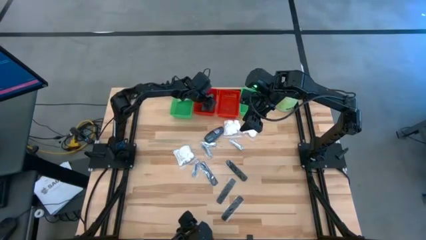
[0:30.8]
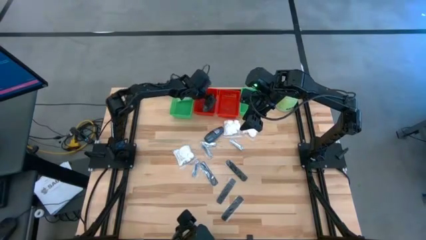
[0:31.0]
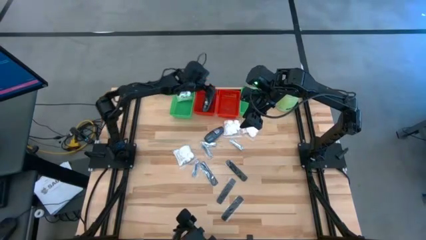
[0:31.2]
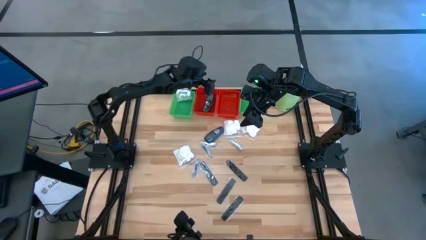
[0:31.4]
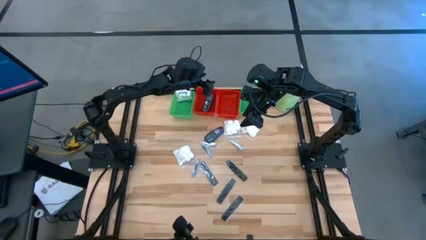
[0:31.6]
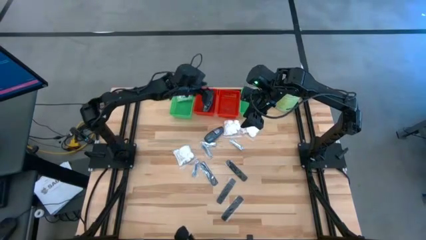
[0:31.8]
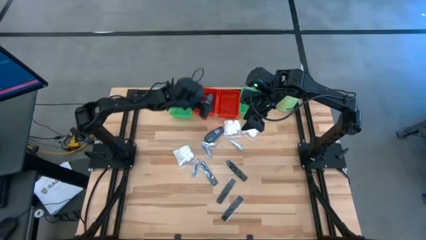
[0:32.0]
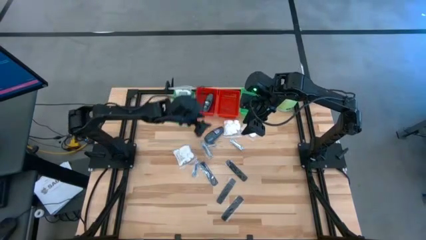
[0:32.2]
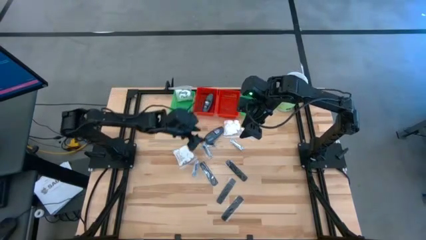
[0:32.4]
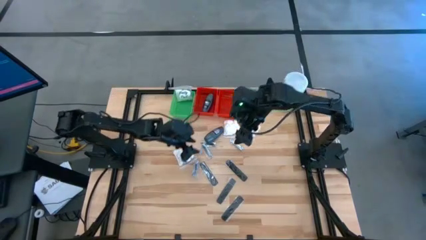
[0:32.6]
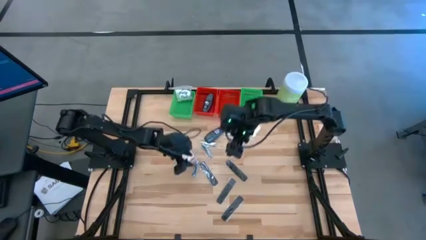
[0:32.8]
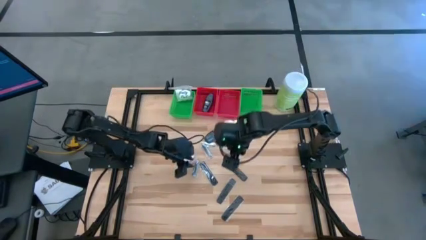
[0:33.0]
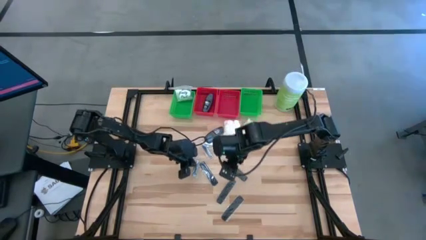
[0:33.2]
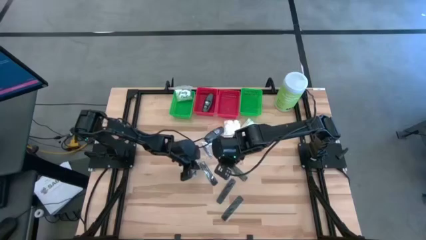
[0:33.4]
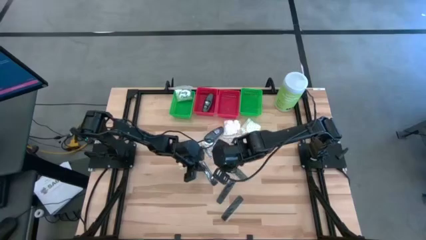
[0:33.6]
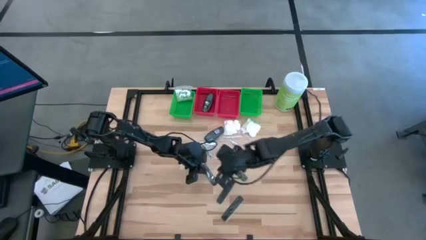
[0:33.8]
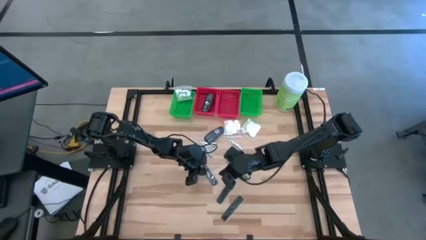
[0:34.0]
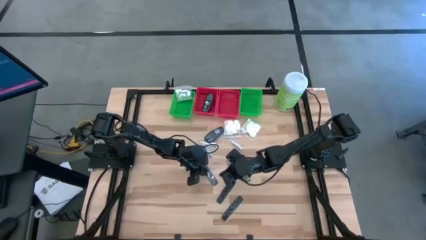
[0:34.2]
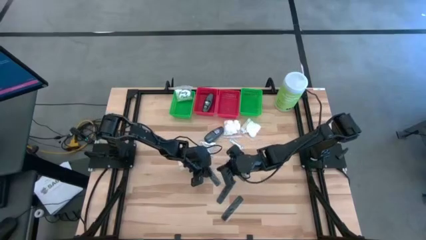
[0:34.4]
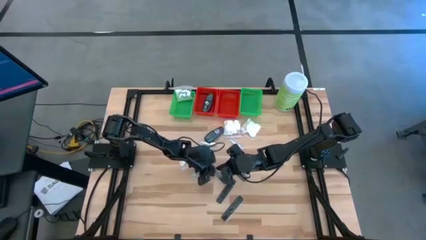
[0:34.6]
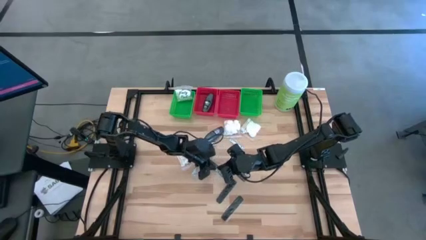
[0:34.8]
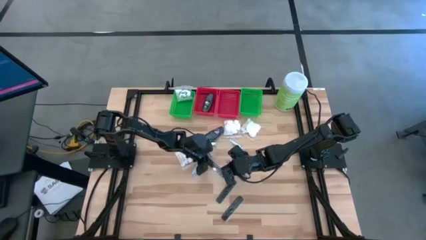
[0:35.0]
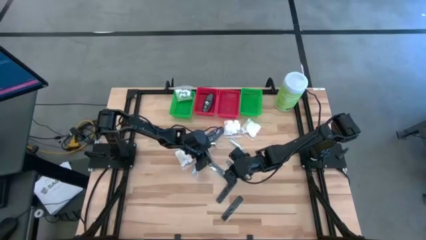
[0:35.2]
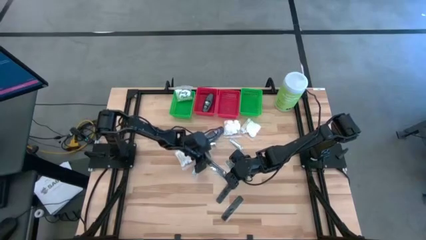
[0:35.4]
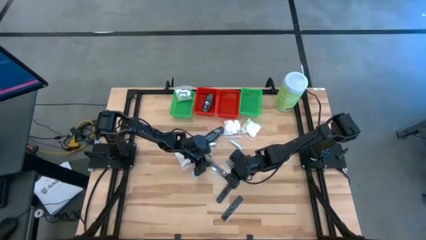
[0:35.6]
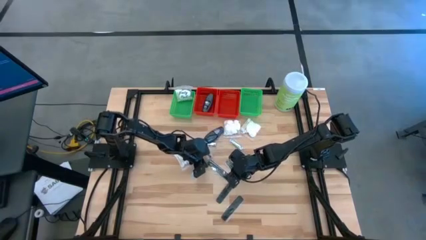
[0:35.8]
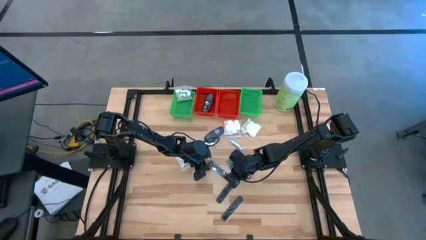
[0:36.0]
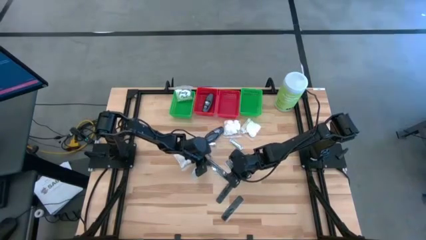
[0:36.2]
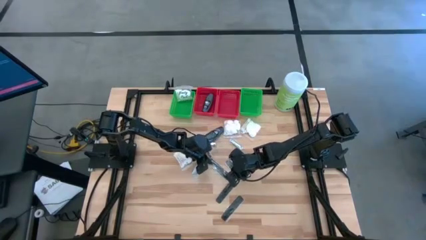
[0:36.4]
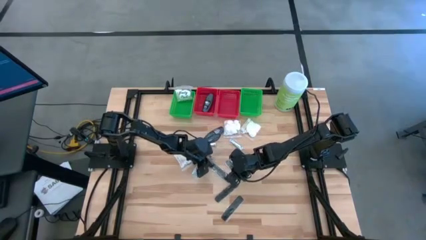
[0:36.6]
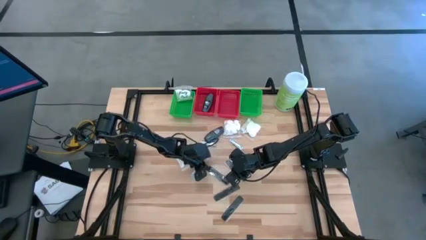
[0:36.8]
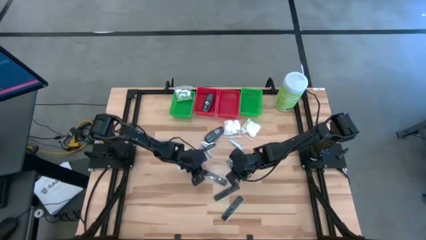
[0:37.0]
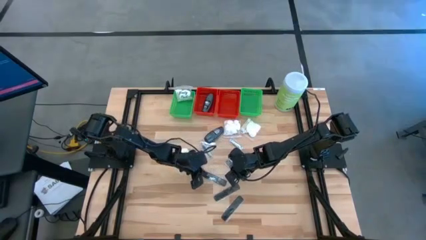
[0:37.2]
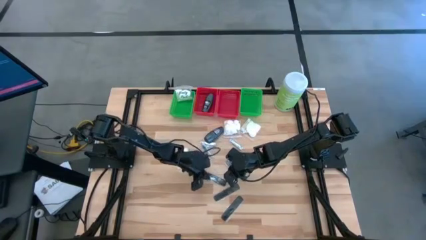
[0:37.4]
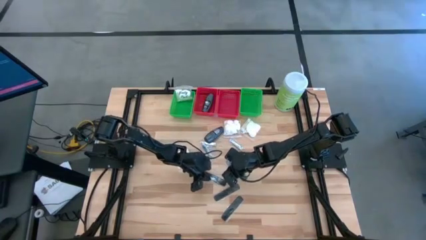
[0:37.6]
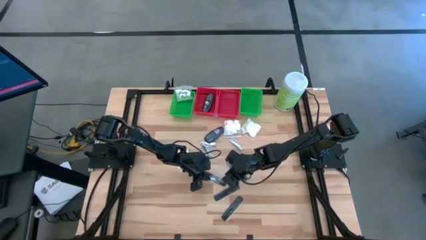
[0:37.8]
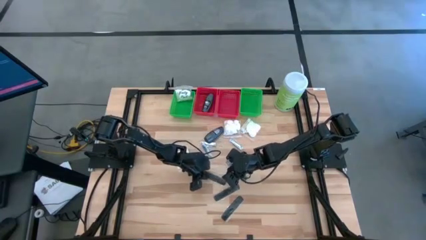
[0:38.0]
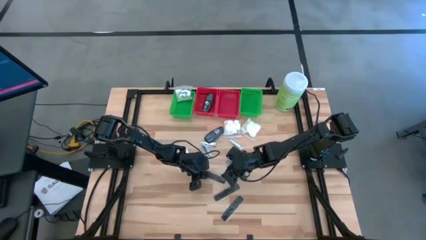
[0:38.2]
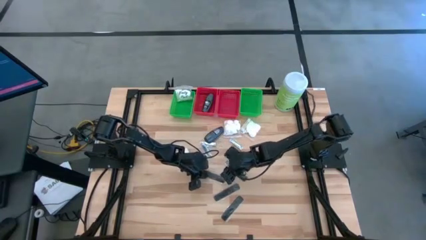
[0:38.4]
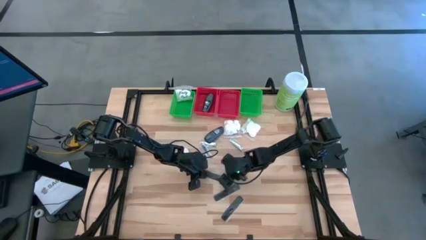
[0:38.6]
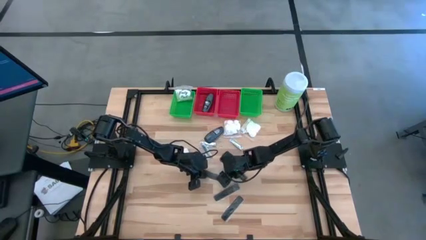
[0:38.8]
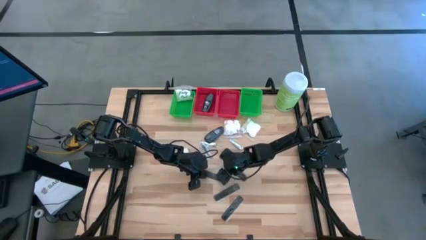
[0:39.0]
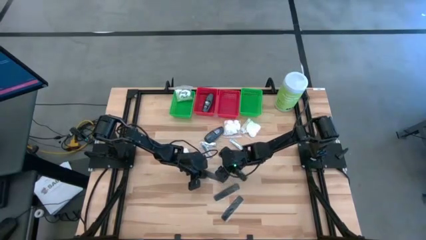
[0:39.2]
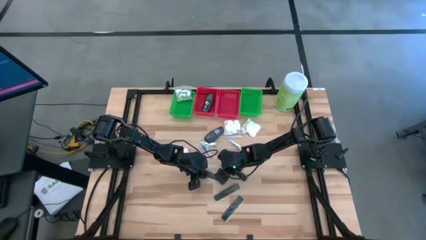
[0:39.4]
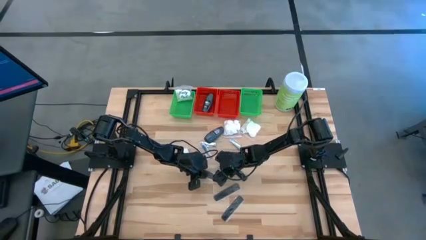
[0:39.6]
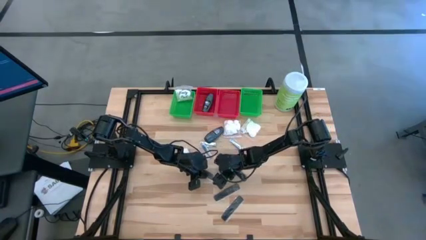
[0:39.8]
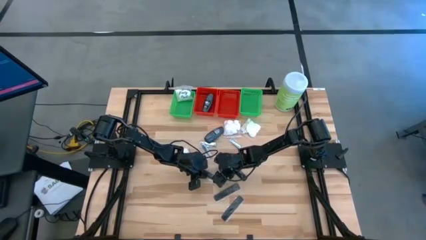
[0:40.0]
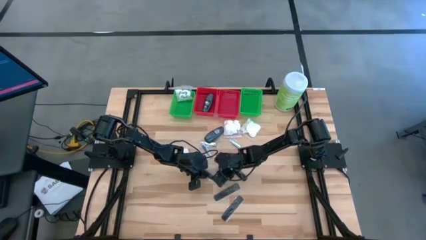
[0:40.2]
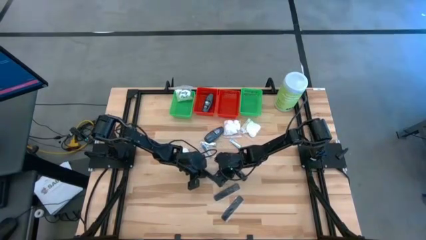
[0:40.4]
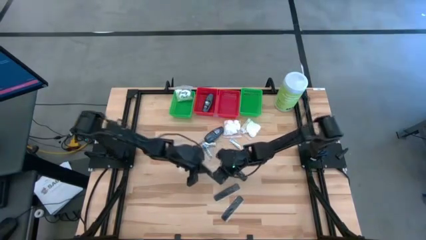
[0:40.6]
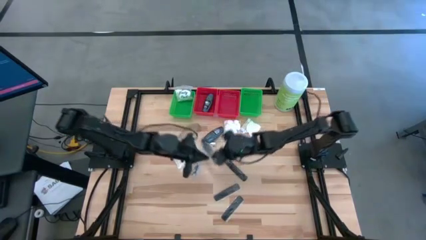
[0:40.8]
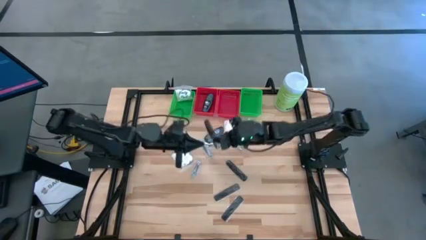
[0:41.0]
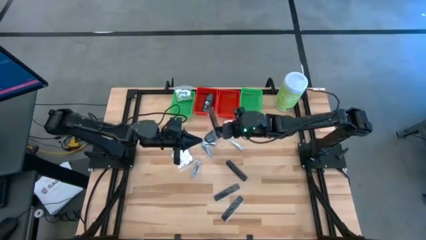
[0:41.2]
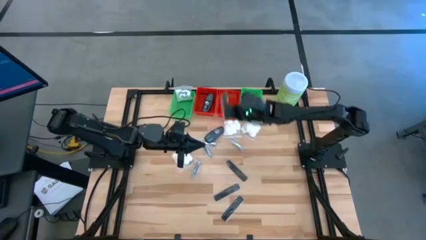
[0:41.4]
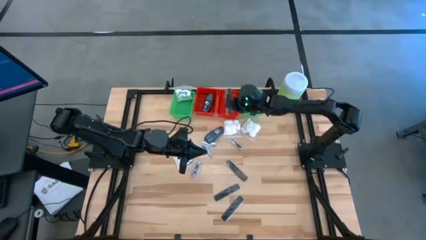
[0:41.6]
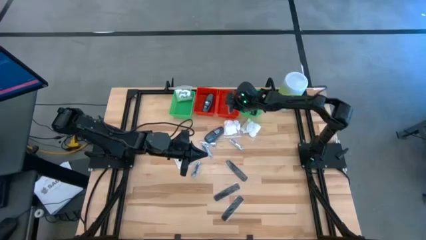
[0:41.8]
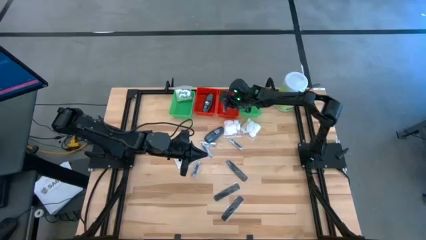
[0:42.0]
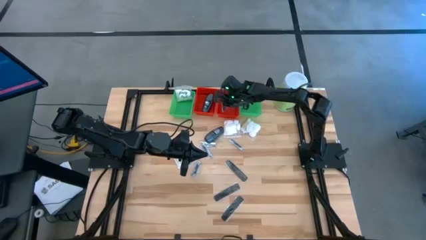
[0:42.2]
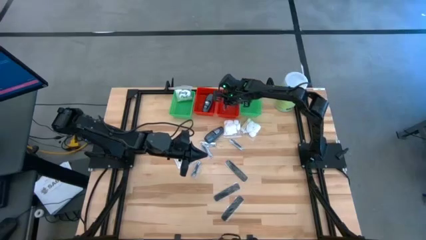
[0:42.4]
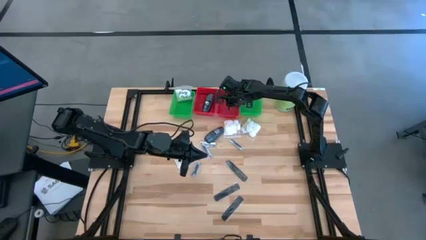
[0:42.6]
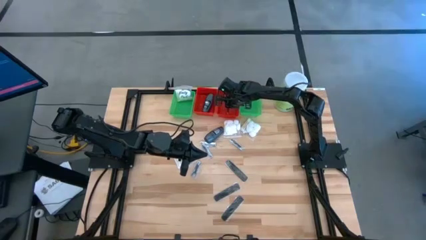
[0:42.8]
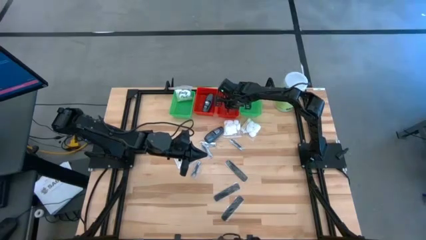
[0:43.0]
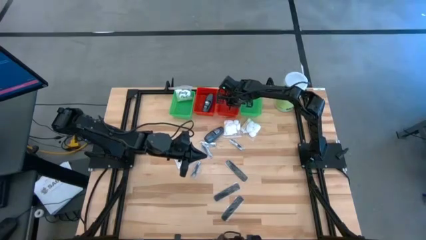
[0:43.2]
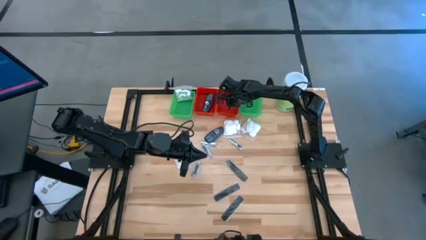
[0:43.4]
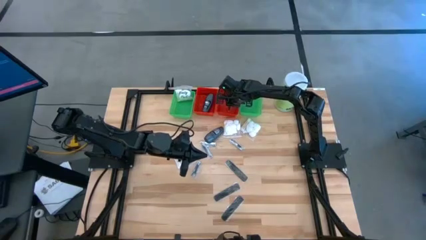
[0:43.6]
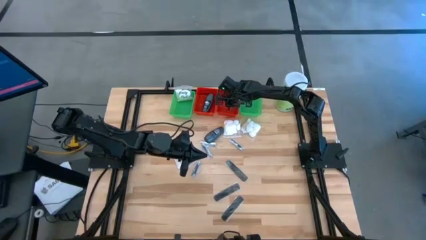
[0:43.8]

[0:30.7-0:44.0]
Task: Pick & Place Travel size toiletries
Put the comb into the right red basket

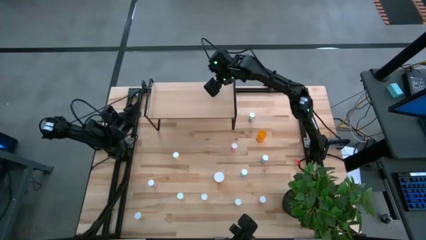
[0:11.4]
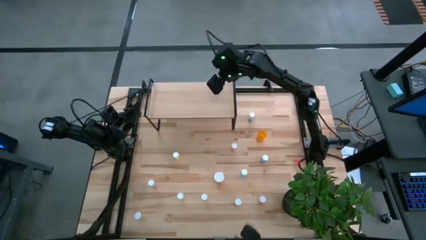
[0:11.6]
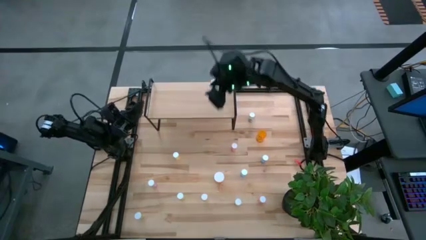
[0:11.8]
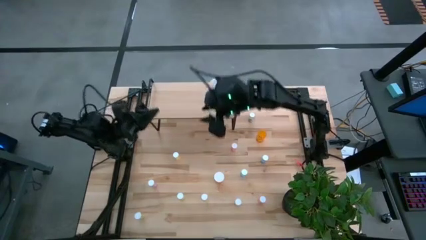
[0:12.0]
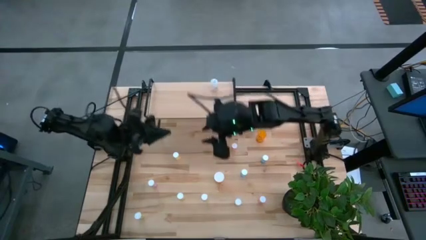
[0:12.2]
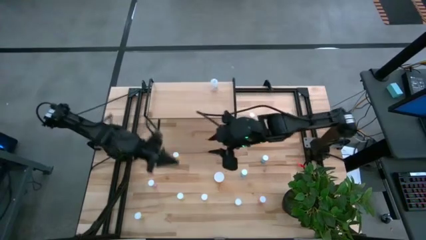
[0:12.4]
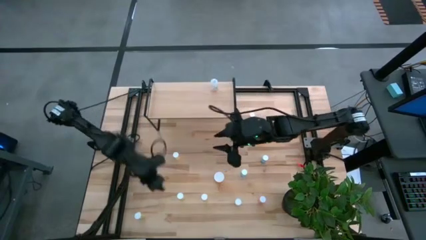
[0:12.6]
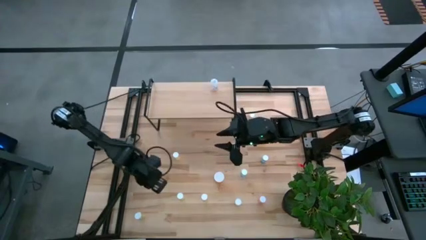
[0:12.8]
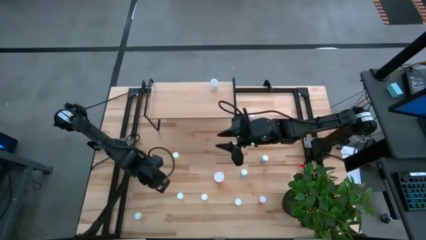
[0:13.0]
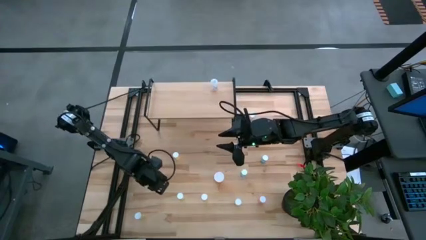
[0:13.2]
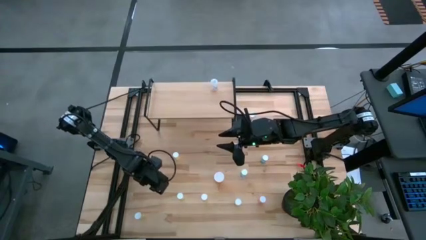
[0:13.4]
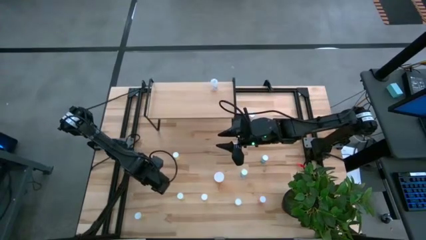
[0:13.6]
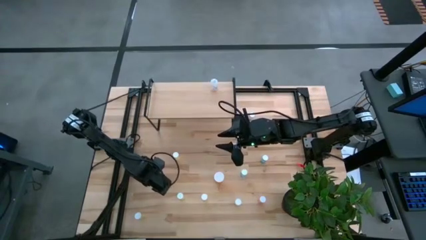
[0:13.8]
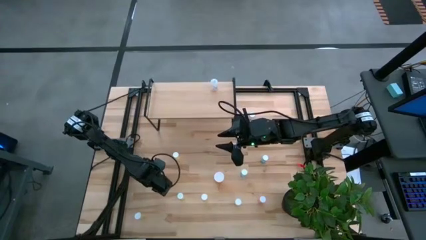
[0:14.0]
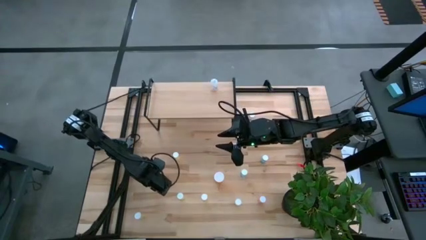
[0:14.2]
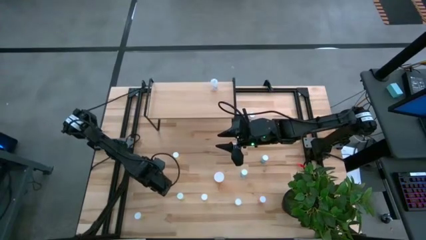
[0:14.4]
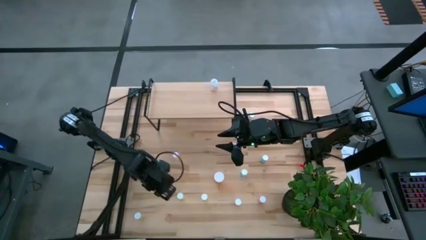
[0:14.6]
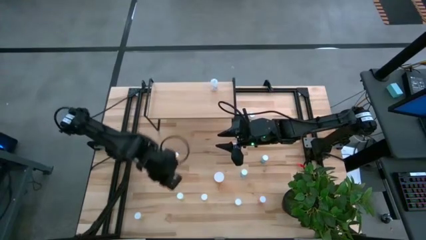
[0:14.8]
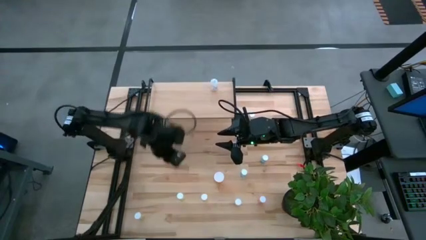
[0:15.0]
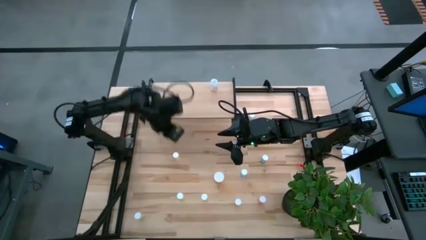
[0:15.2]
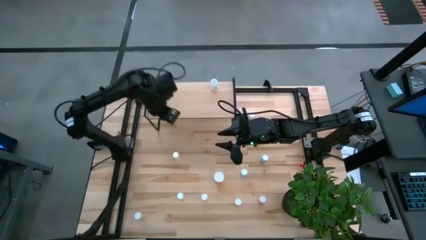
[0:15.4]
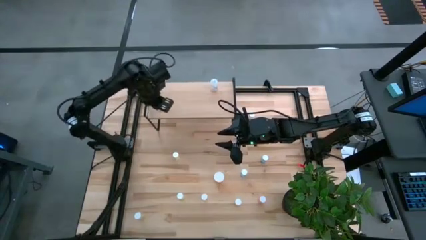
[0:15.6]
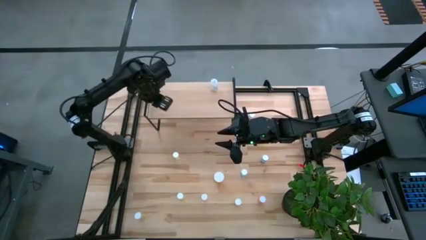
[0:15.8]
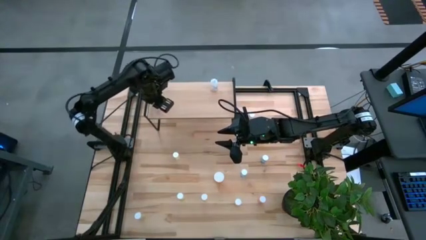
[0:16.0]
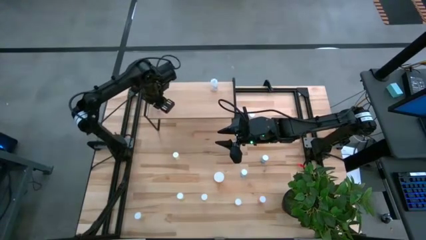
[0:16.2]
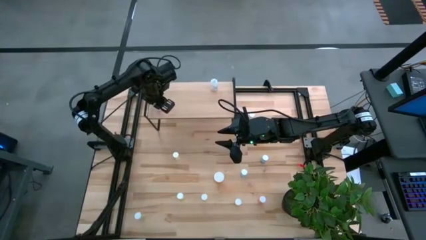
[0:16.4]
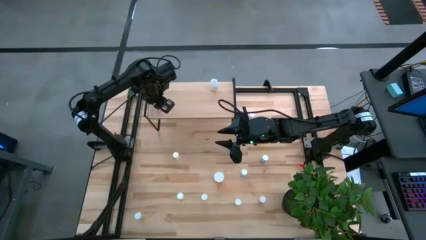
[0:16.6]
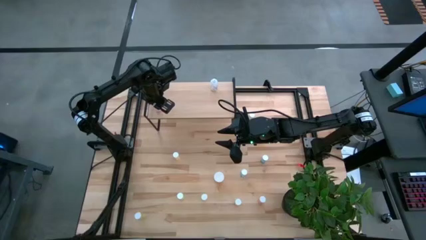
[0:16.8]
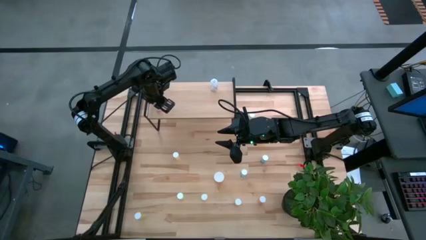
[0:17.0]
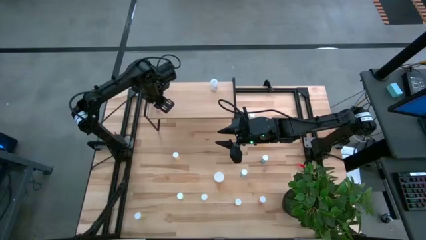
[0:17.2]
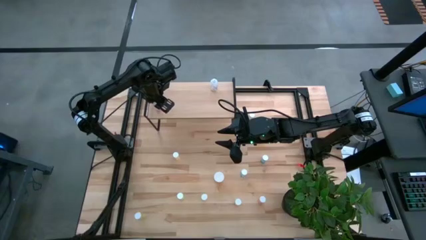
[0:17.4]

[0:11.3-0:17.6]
Task: Pick and place medicine bottles onto shelf by color
Put the violet pill bottle on the shelf
